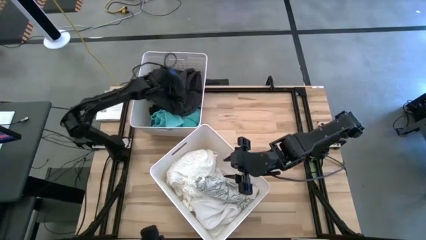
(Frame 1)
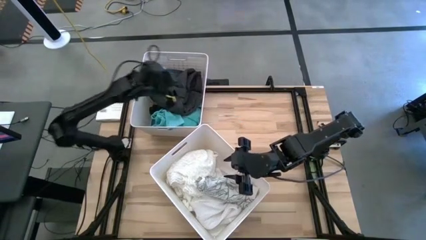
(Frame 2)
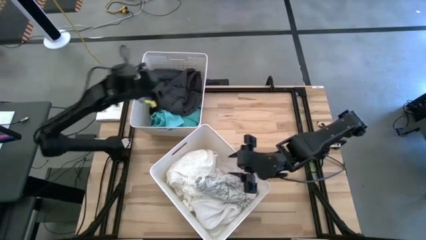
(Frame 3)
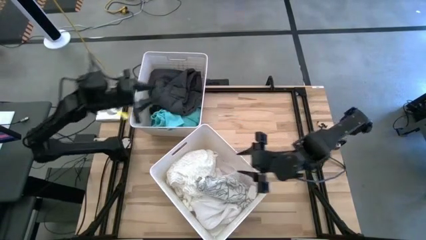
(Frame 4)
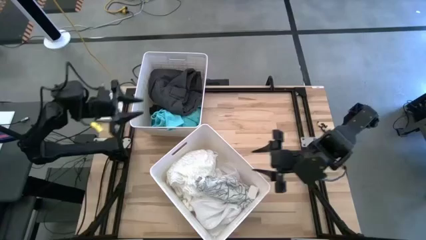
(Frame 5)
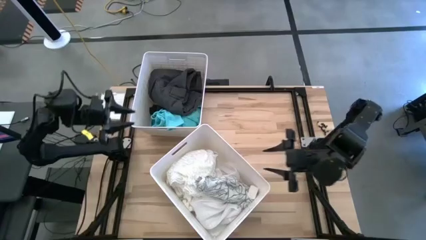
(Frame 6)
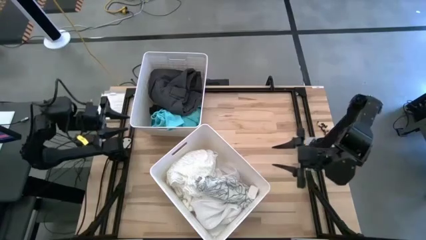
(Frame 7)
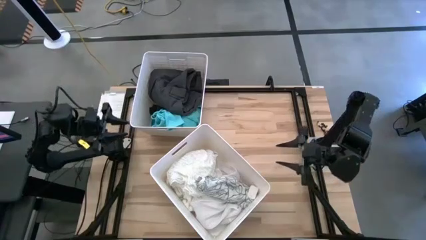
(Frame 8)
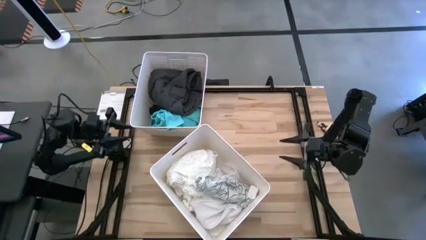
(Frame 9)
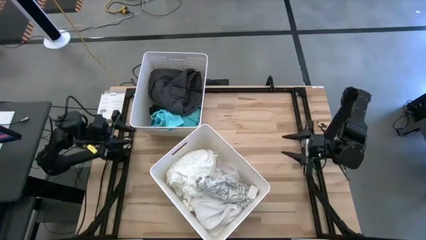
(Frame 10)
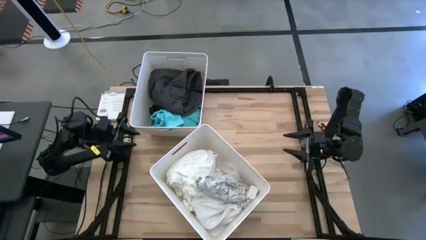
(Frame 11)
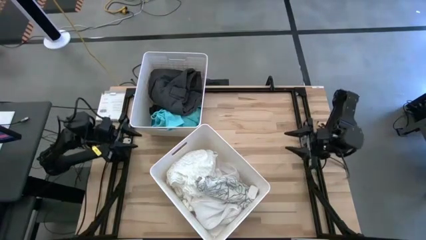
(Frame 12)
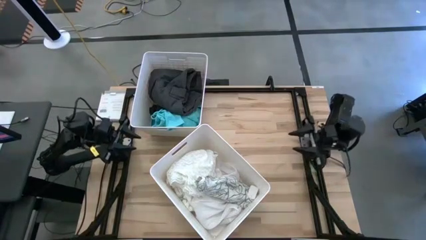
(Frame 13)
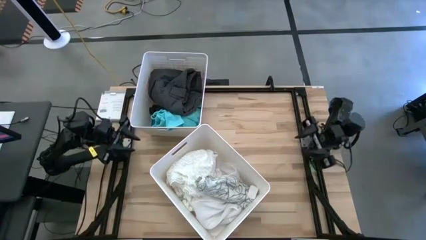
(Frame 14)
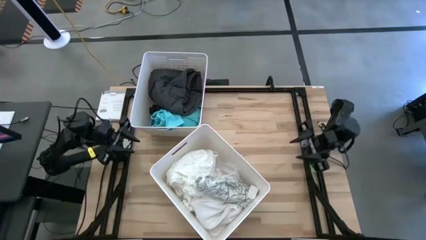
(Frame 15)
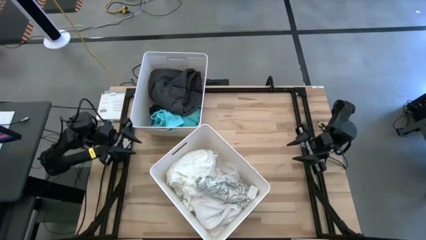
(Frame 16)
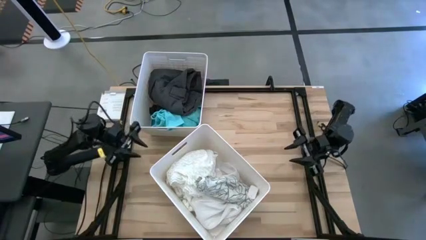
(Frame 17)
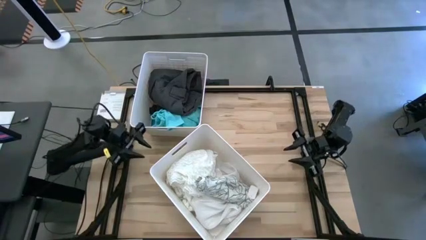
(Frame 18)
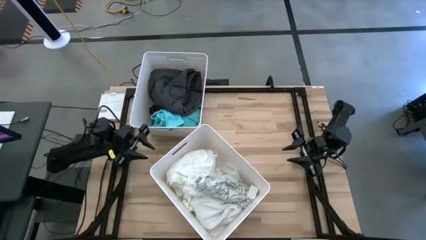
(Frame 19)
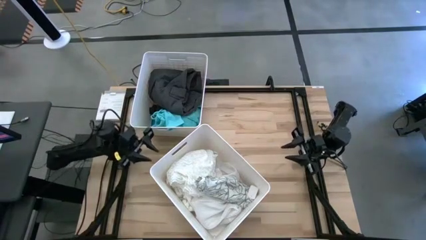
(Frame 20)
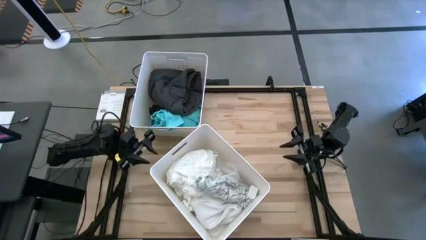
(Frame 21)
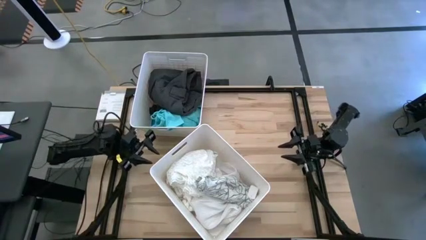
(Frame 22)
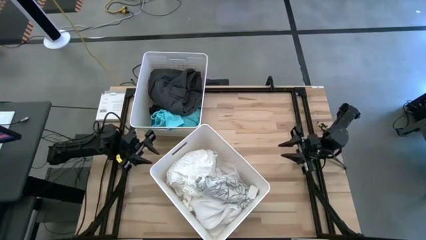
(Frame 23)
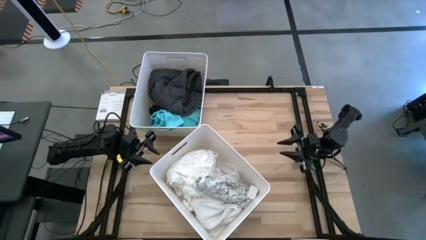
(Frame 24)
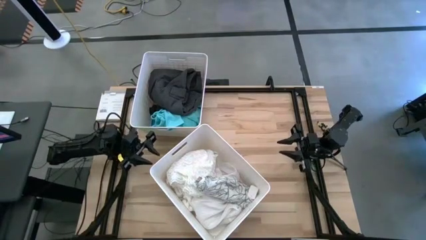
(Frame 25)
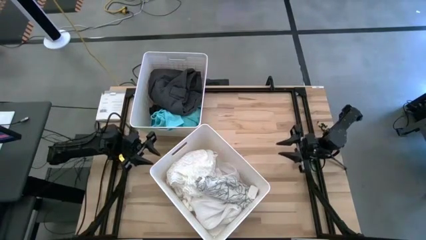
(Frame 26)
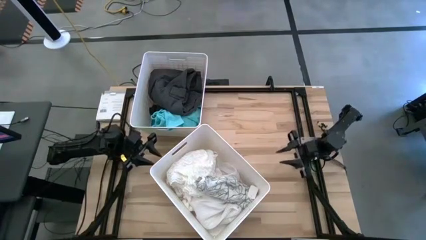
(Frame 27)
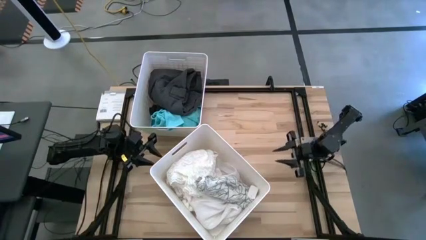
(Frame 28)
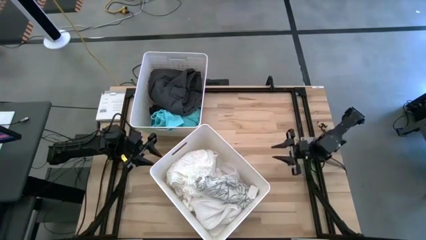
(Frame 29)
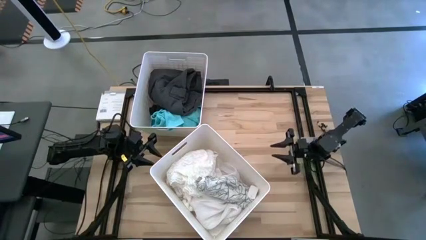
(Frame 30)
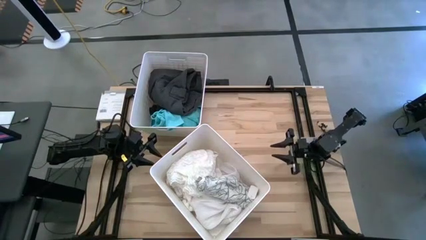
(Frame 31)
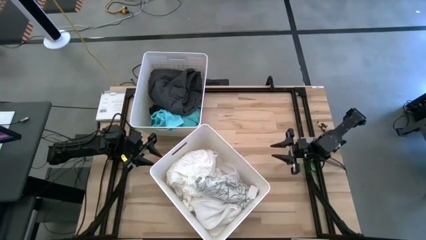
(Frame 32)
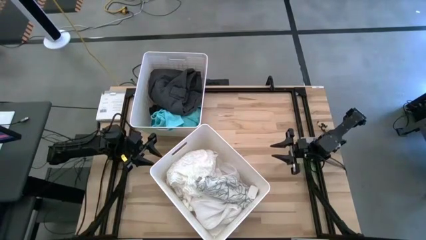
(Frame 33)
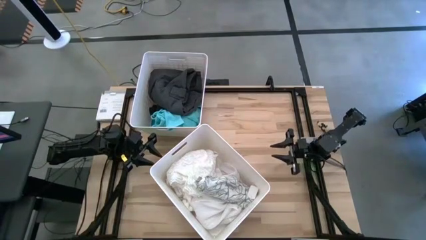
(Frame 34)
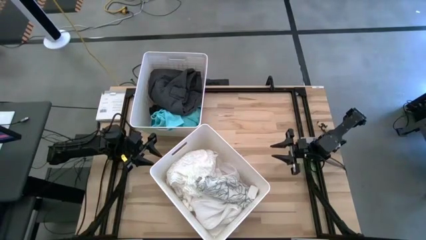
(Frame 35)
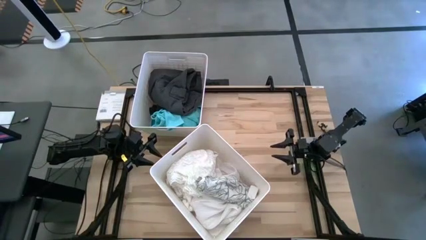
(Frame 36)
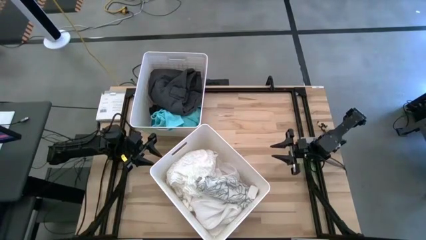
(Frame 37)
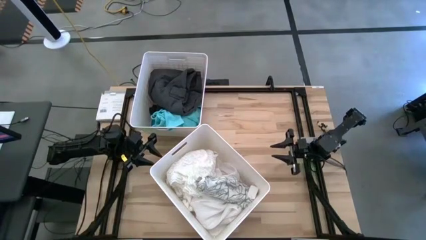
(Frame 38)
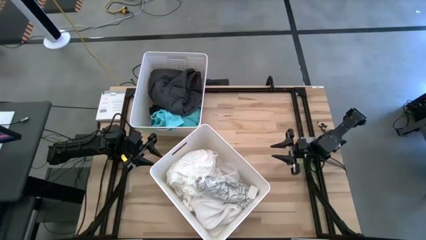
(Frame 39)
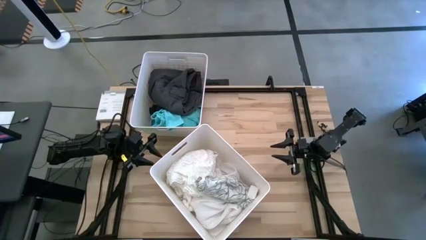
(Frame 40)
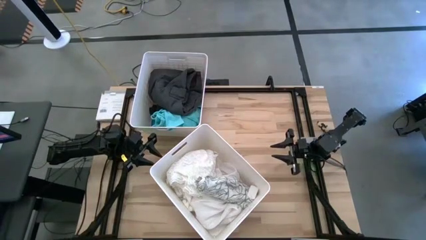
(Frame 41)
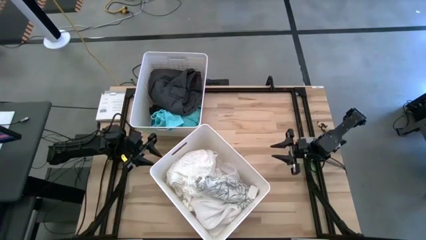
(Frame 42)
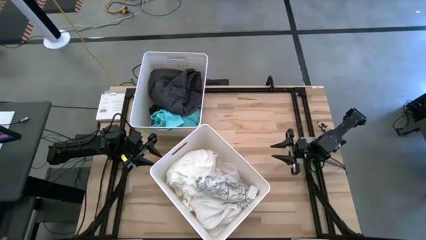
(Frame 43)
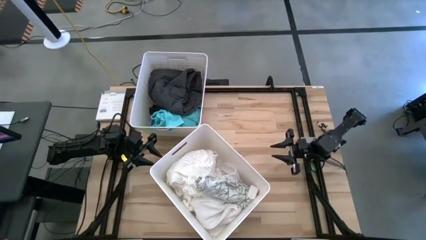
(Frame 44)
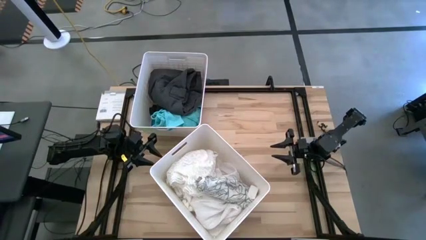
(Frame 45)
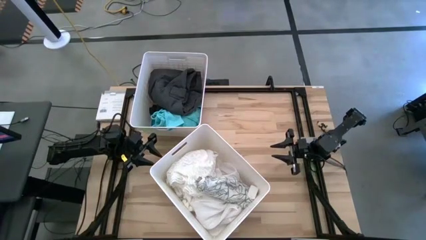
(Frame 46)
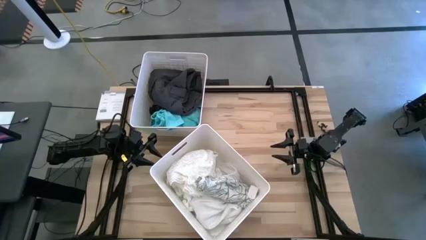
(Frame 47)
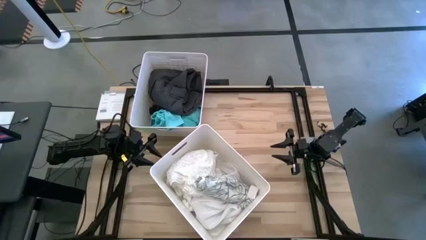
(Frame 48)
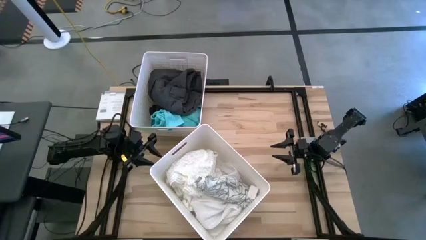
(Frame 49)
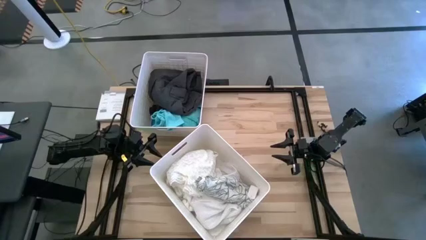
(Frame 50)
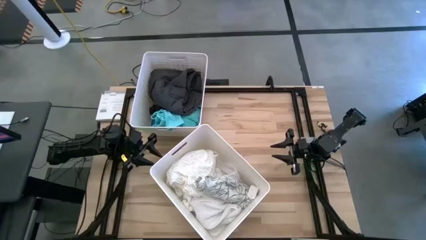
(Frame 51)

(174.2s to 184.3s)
Task: Sort clothes
Return to Home Position

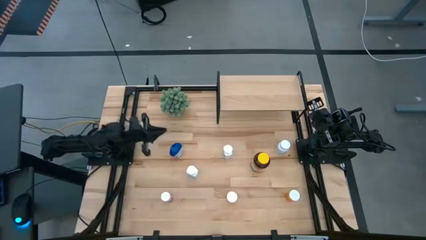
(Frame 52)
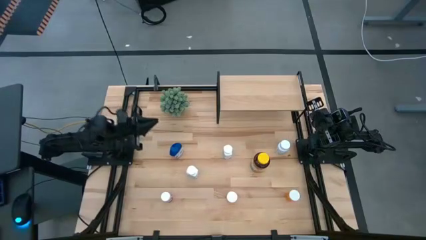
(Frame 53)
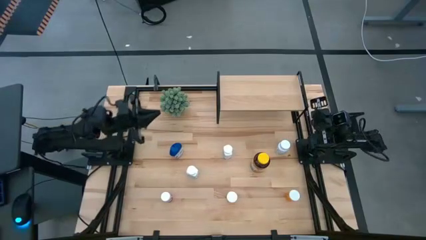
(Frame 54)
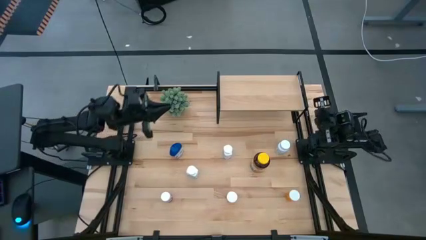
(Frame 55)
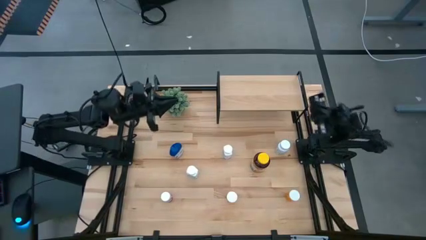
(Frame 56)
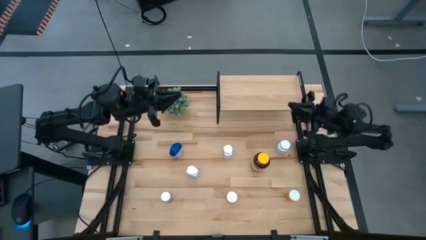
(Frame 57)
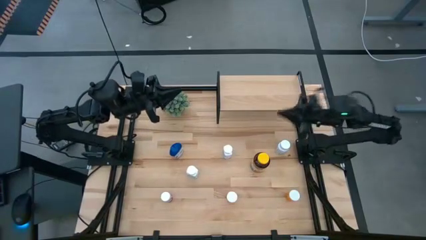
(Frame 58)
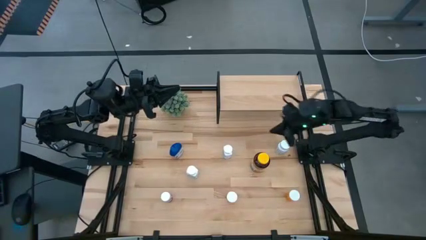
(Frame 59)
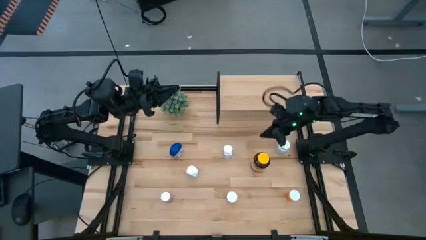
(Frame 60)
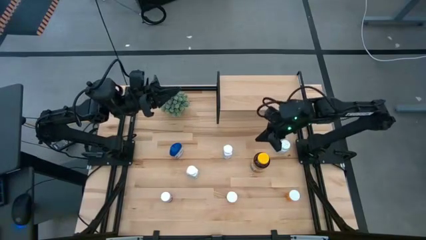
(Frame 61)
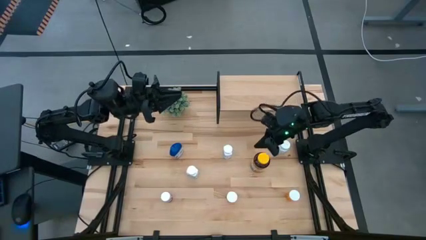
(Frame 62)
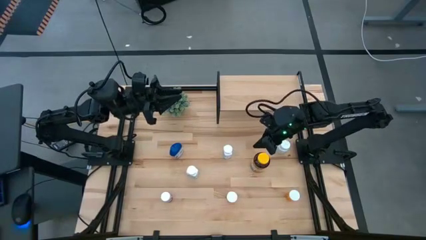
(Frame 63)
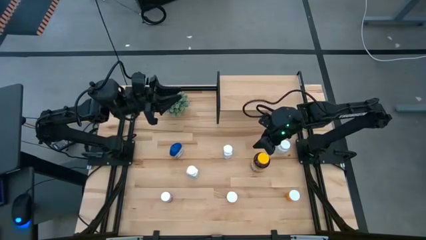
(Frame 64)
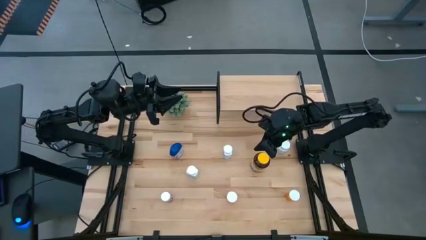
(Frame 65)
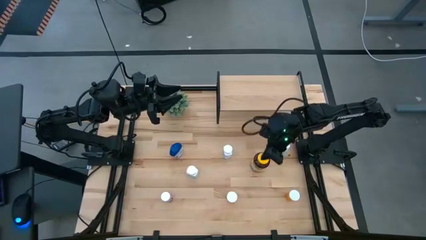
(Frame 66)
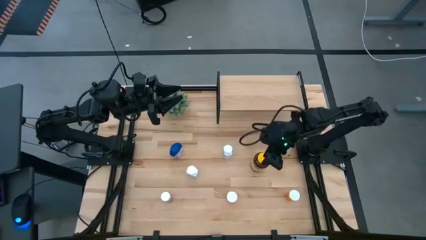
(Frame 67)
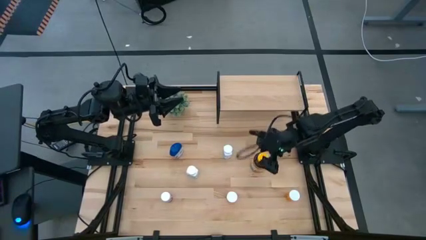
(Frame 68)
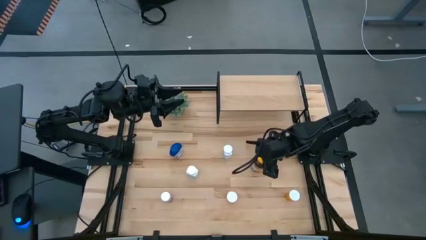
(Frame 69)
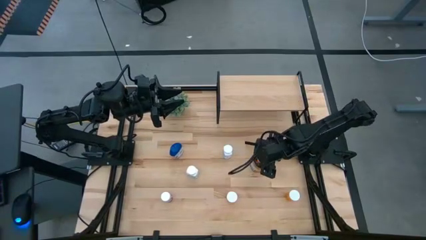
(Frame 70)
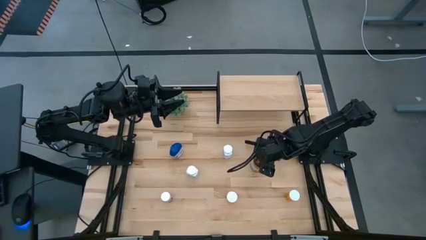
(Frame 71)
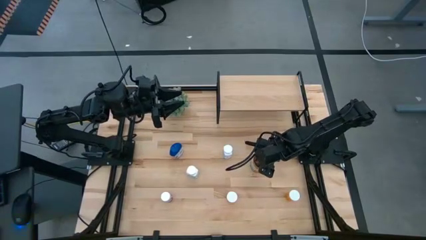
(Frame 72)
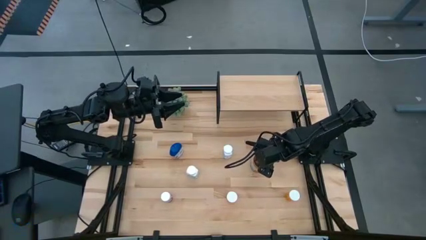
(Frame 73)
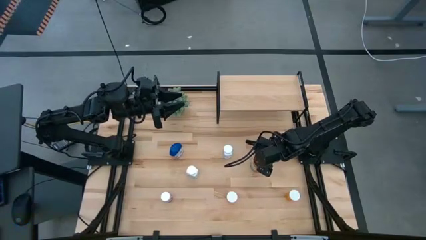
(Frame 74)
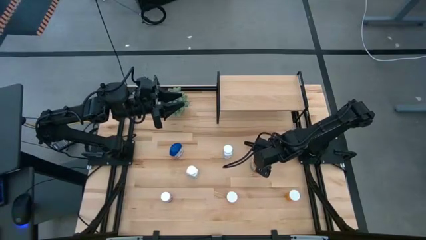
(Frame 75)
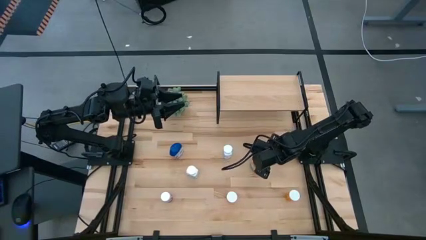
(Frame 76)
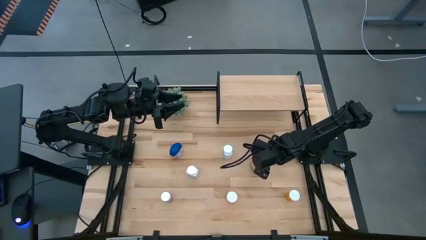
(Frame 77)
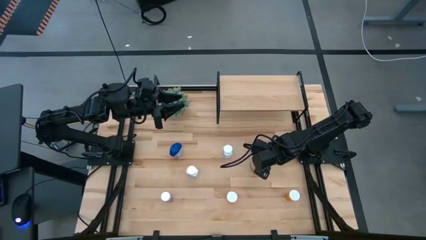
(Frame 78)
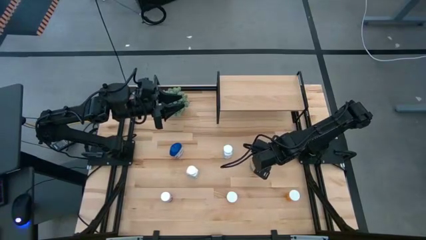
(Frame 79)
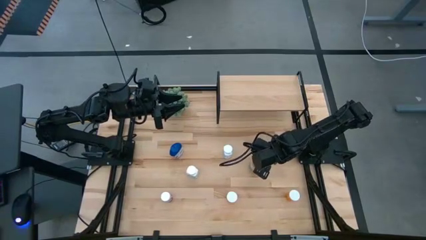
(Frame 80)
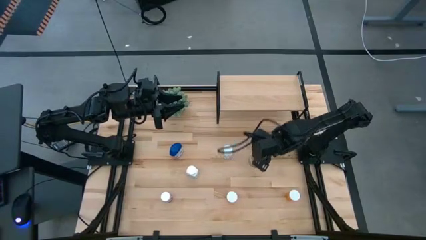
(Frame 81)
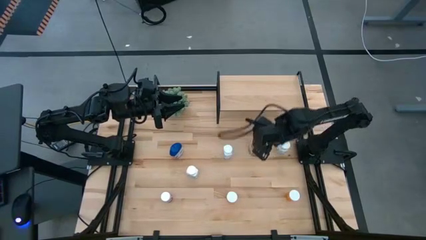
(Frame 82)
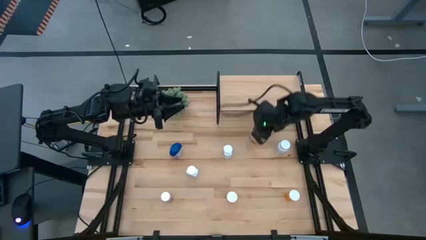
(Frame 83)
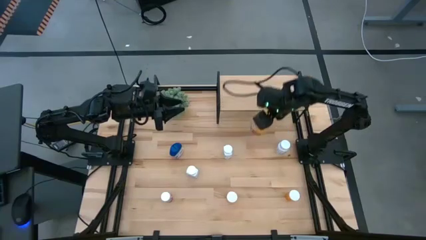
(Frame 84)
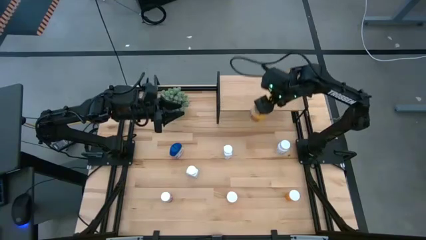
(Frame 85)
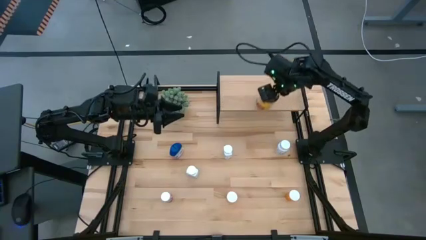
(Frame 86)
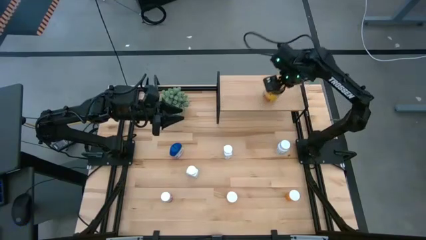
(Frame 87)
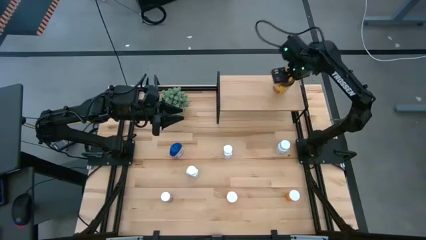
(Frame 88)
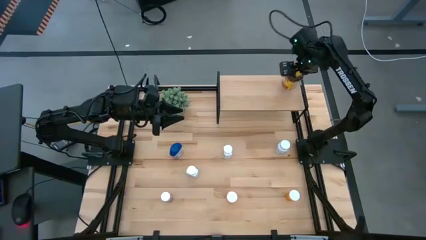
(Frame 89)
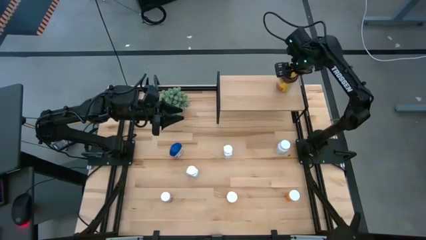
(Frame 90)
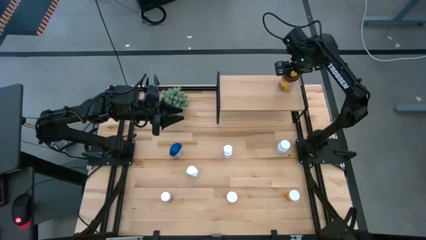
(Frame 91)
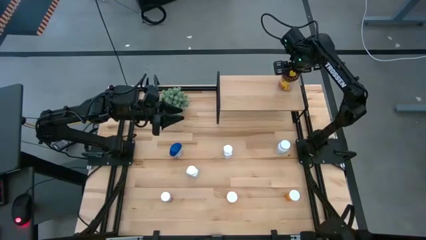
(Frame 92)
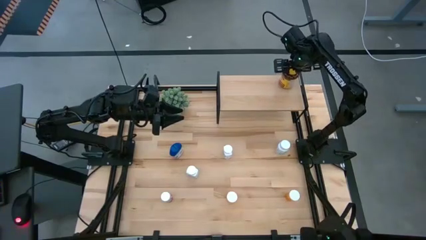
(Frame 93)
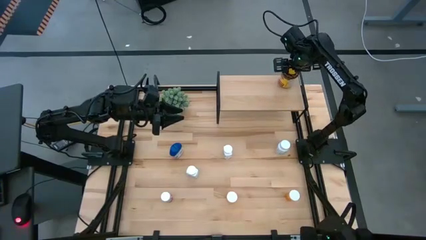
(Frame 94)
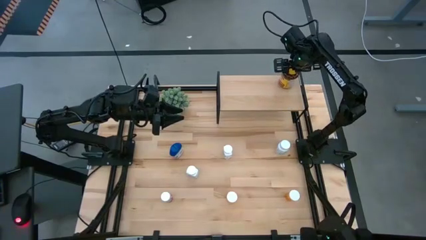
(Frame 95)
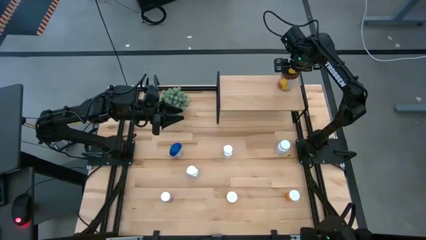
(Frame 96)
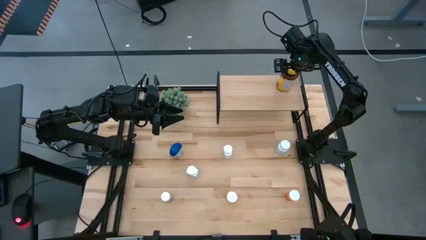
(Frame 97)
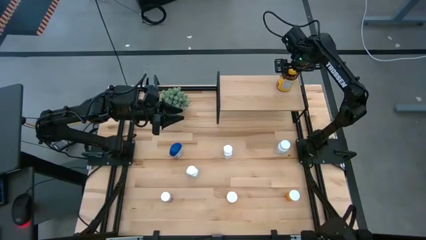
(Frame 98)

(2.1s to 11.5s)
Task: Pick and place medicine bottles onto shelf by color
Put the yellow medicine bottle on the shelf
